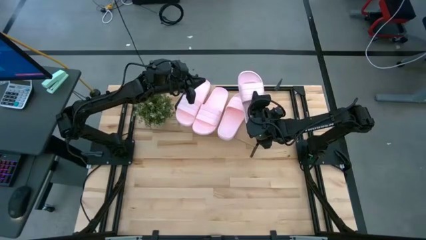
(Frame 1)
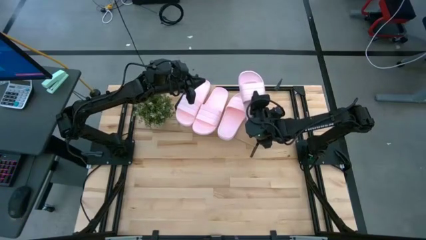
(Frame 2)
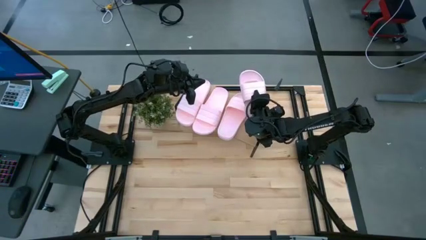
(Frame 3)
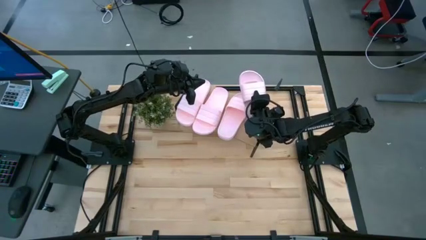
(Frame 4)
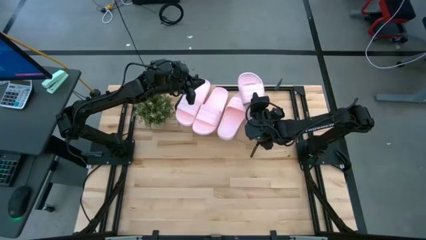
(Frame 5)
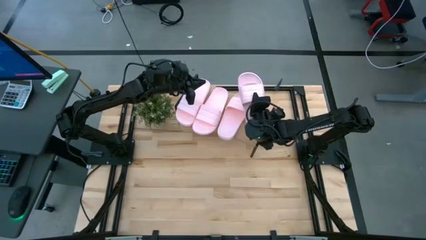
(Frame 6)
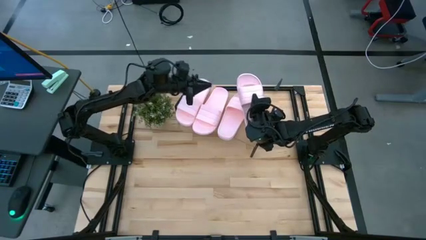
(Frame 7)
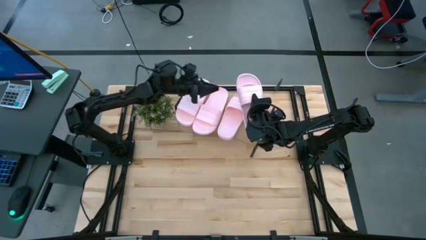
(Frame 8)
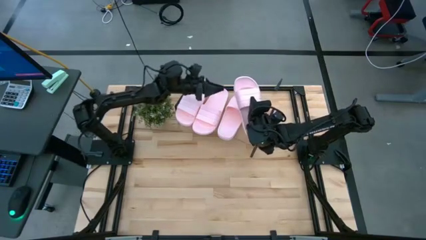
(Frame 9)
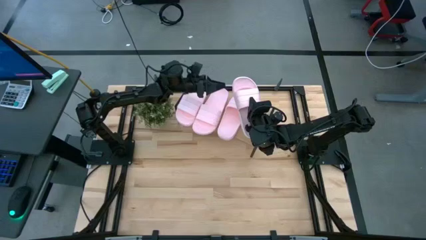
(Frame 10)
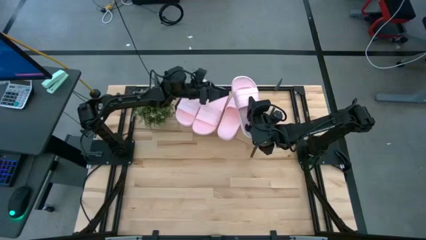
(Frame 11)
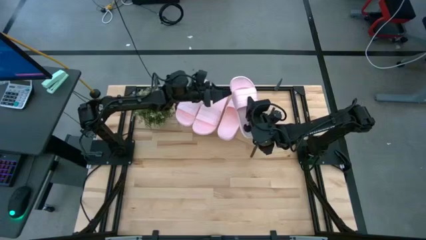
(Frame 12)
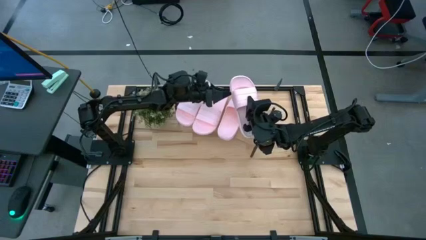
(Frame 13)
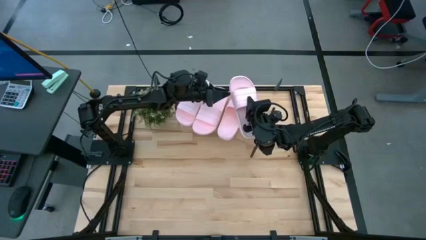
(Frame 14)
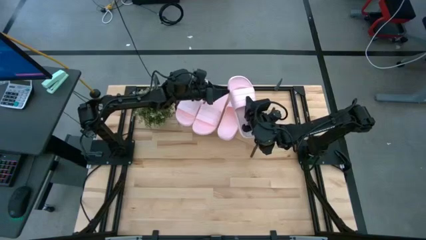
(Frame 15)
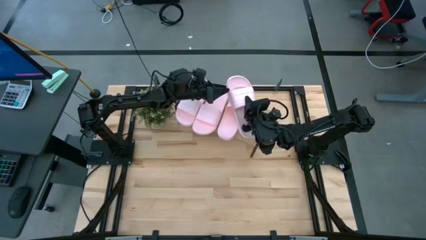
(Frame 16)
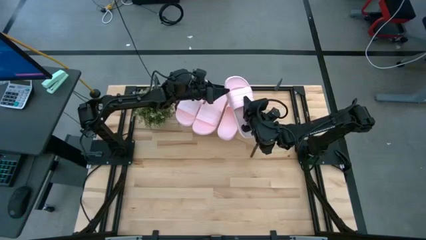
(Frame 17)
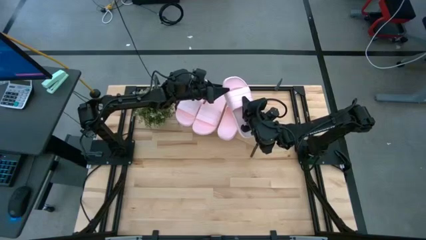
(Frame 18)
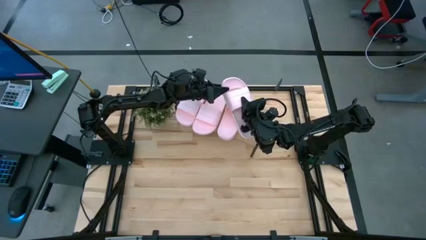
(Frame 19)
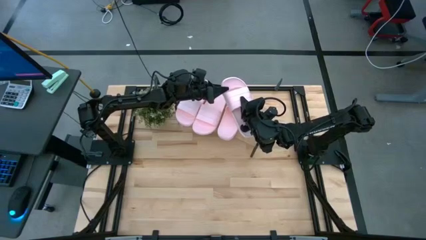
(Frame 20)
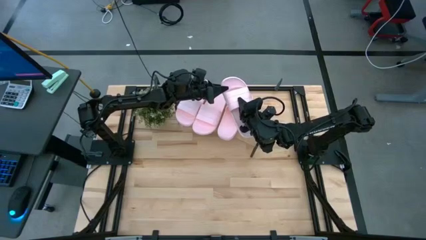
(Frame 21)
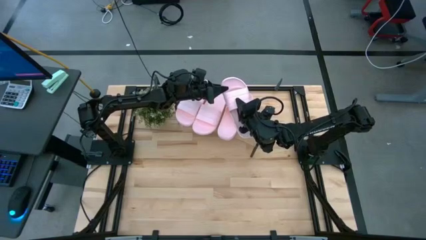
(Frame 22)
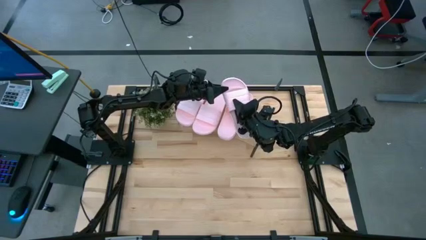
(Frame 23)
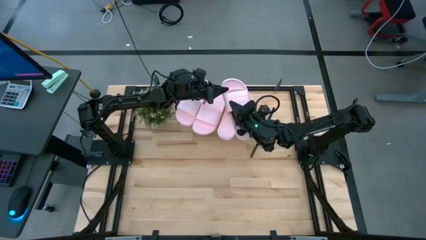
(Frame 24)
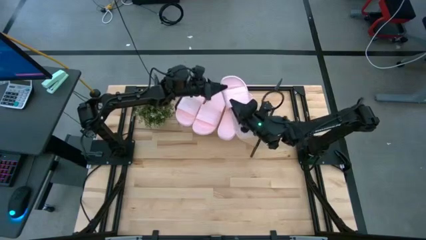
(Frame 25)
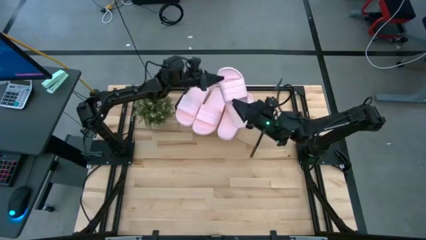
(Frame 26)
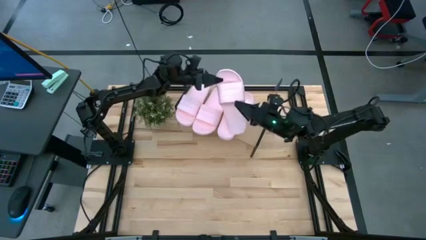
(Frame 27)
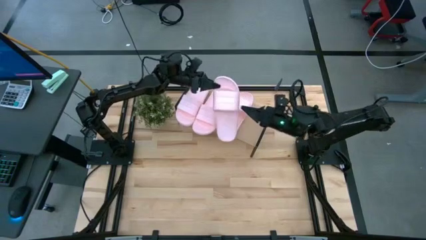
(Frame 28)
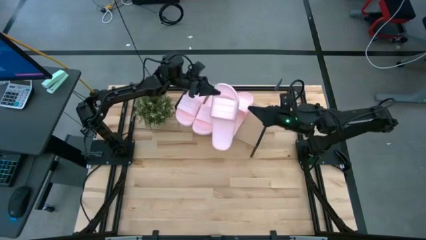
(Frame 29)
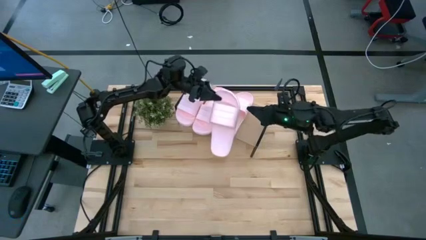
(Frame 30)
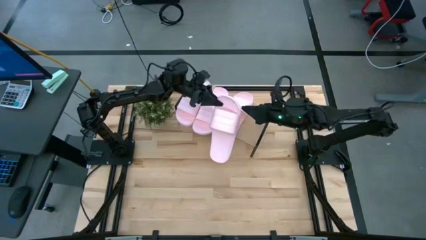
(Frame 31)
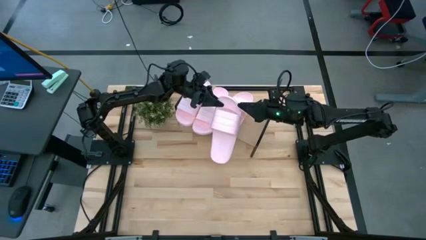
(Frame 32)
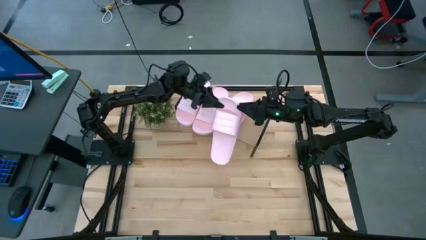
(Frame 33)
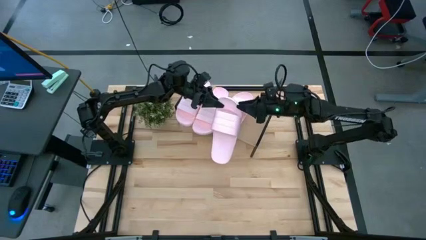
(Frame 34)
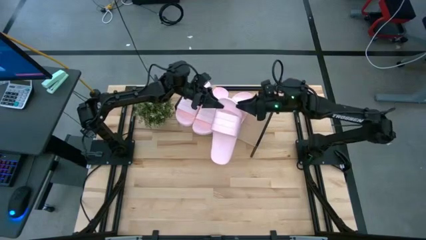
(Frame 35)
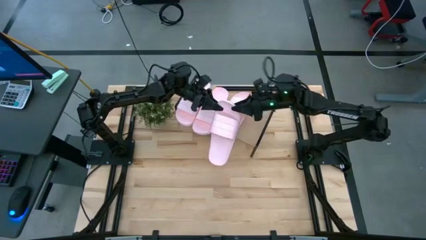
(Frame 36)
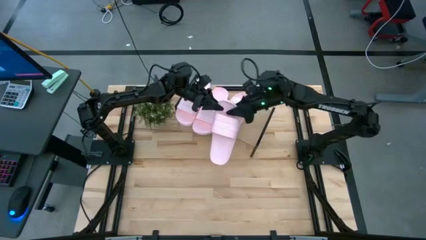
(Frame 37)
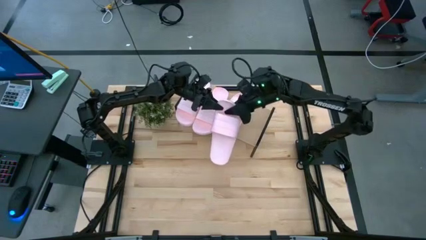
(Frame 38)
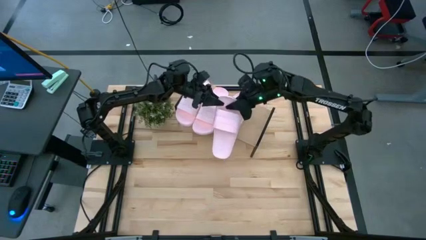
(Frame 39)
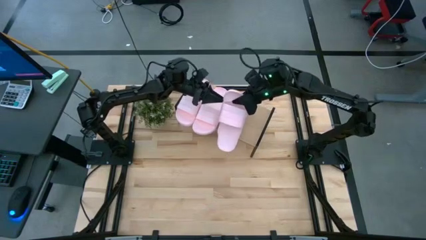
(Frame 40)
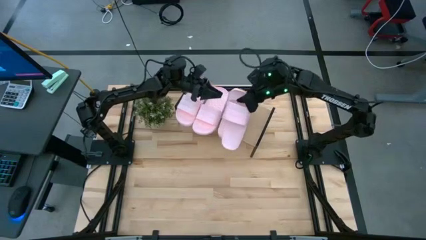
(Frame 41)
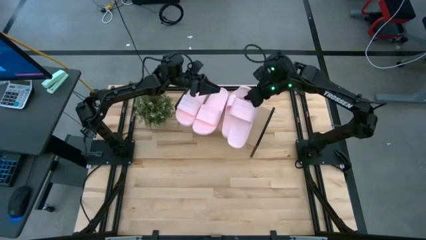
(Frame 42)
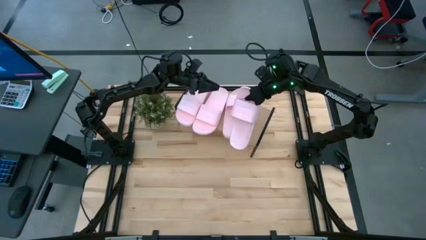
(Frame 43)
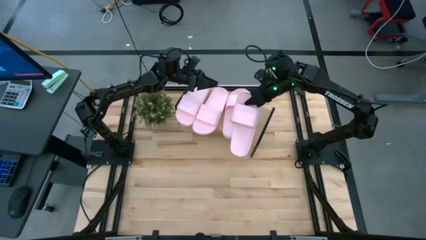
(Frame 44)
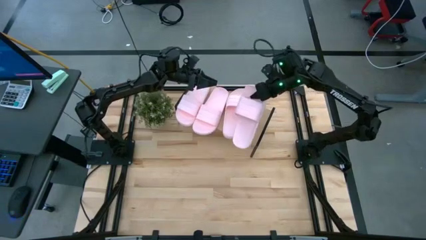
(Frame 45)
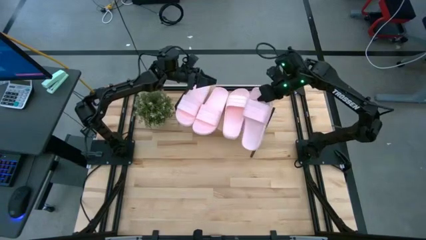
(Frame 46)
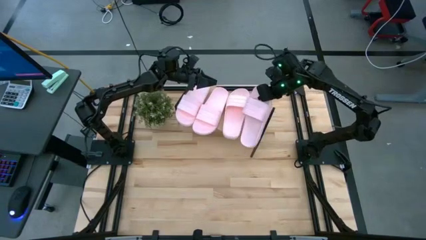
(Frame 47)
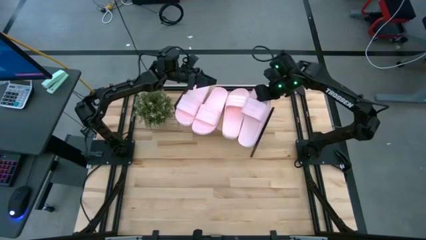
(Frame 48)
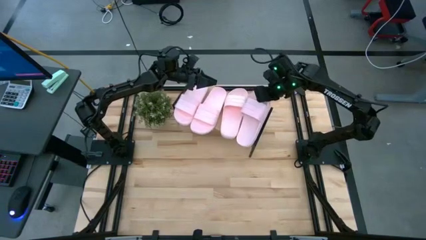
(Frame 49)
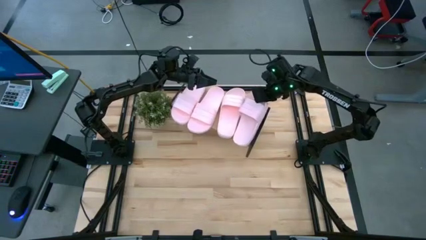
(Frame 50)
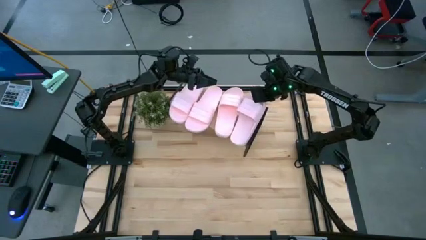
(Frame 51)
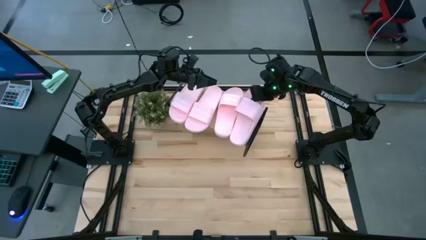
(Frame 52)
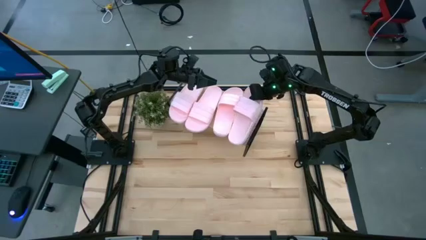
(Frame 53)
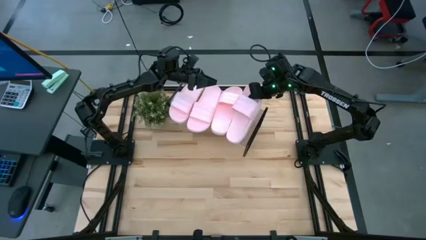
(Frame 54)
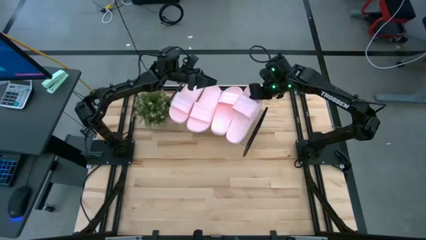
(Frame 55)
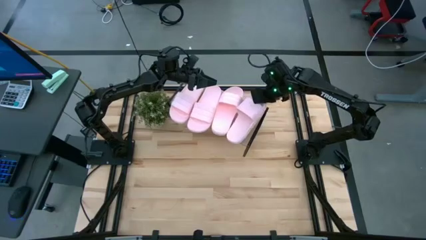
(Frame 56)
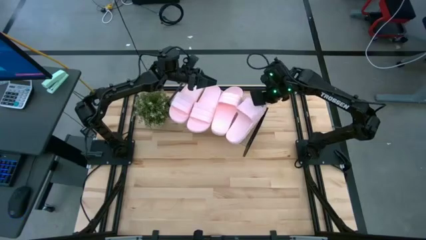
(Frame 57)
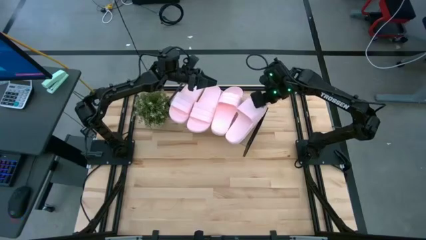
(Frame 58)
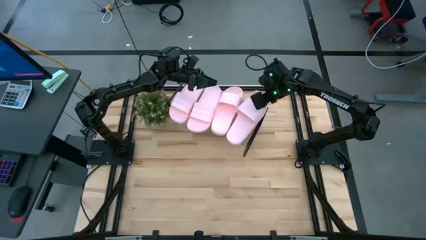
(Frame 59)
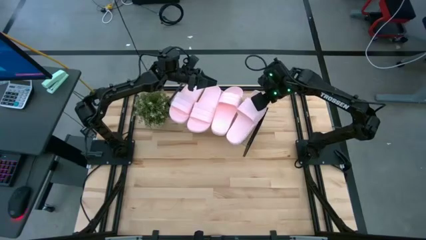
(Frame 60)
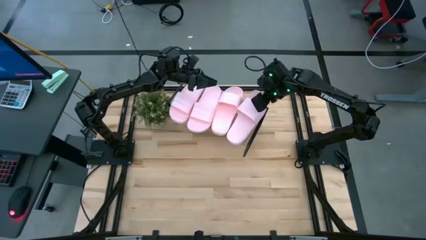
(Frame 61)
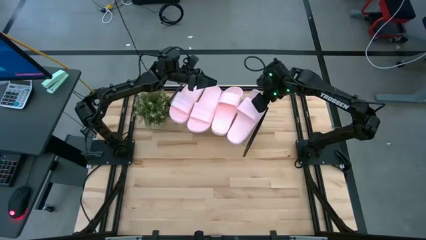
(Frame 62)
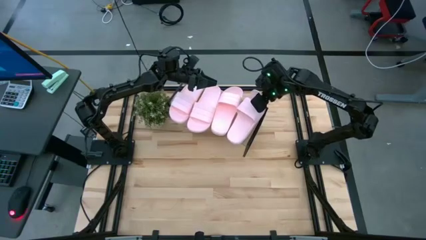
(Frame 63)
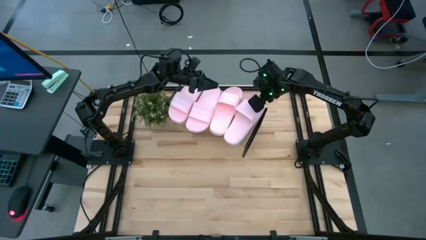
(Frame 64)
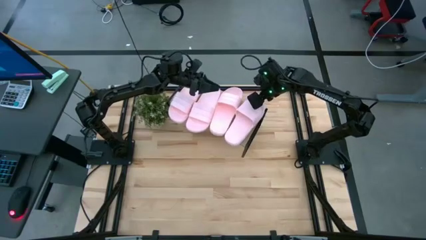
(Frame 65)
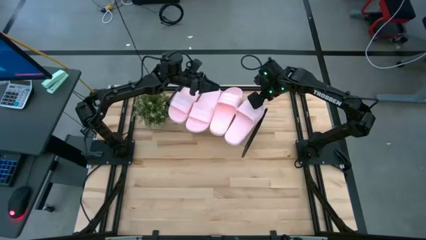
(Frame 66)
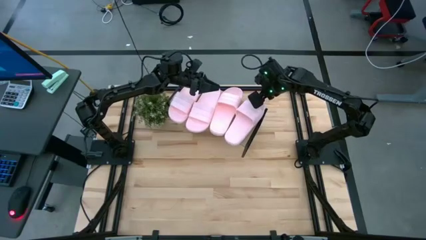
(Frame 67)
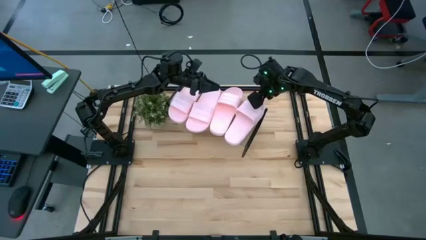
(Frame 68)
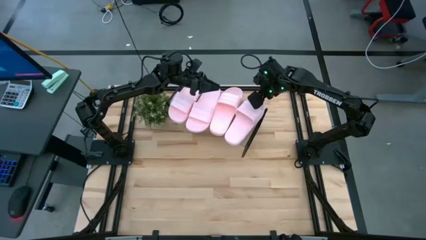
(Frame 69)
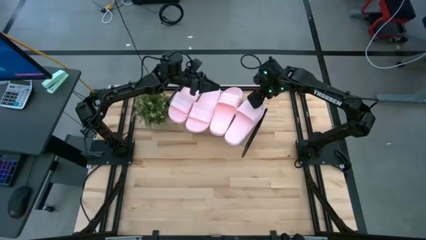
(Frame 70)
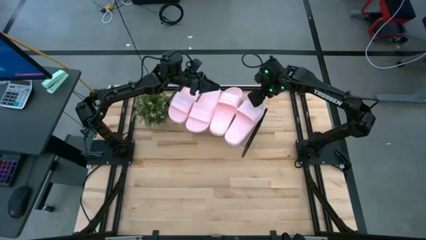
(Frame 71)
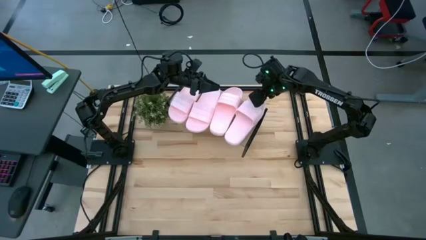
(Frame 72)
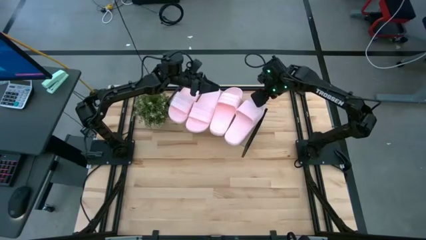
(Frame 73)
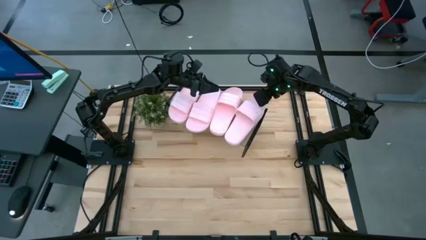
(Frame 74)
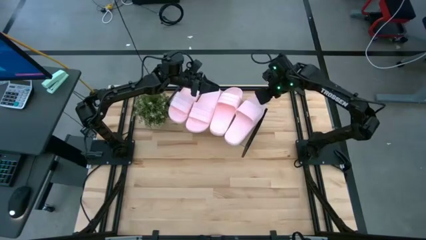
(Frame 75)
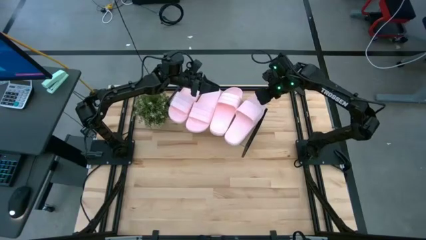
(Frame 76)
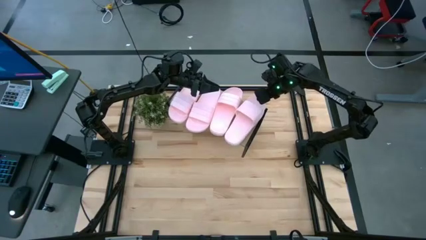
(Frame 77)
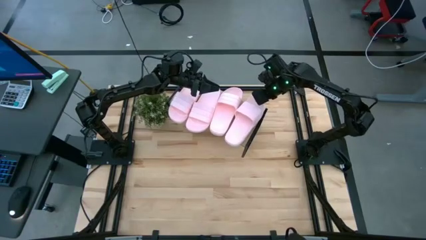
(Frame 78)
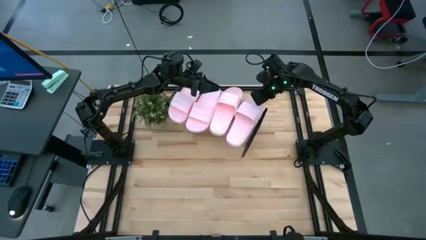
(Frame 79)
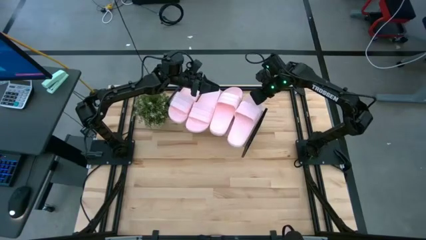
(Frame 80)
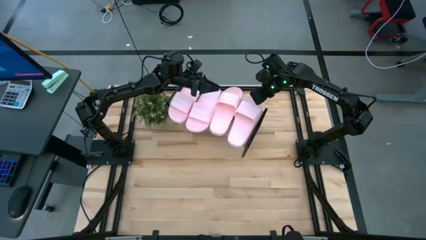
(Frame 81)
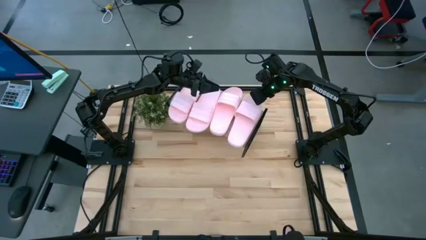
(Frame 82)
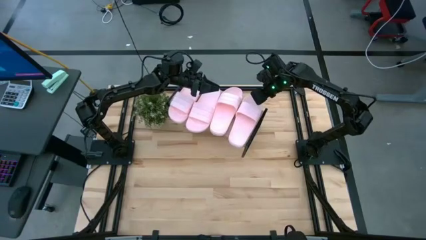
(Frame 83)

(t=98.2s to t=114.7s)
Task: Pick and place slides into the shelf
Put the pink slide on the shelf
